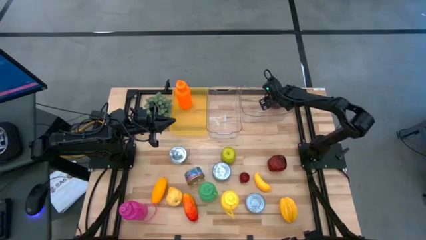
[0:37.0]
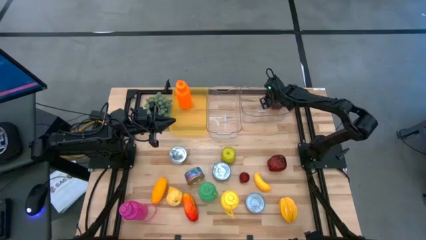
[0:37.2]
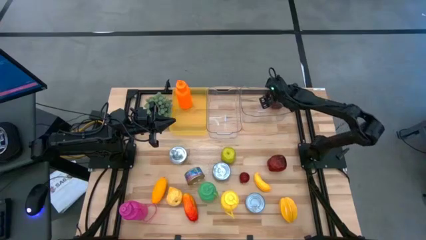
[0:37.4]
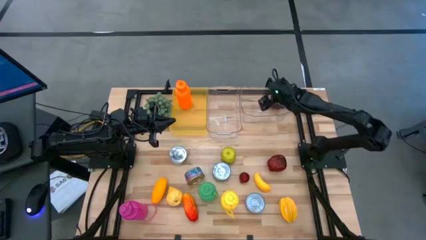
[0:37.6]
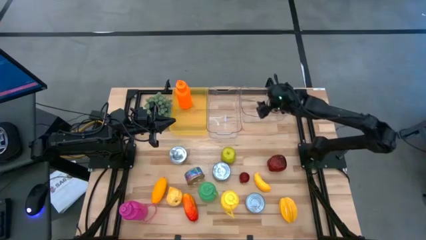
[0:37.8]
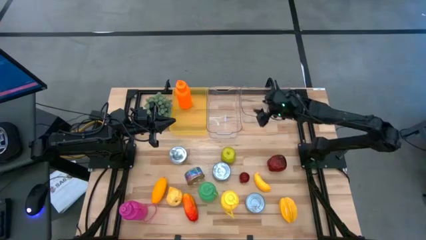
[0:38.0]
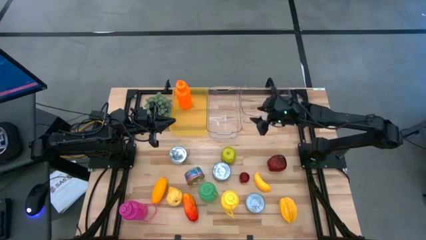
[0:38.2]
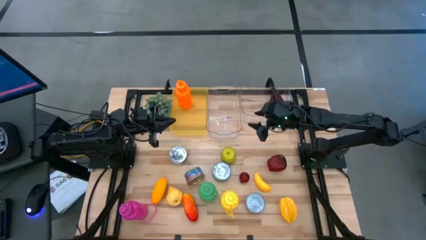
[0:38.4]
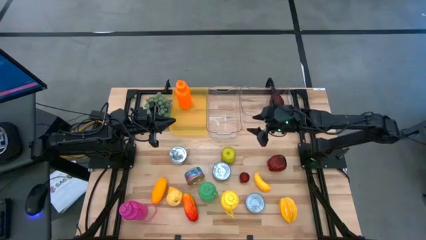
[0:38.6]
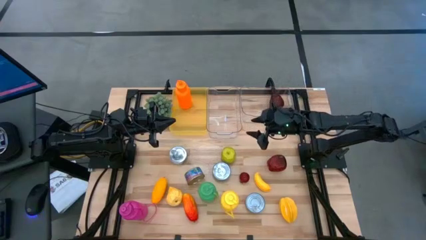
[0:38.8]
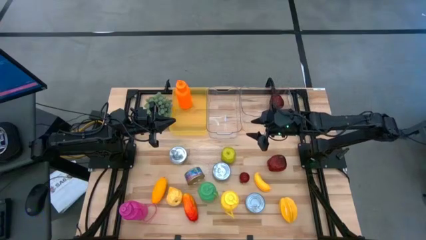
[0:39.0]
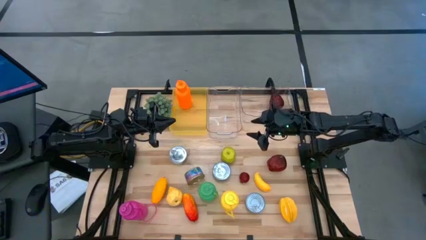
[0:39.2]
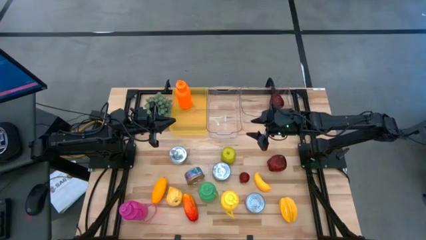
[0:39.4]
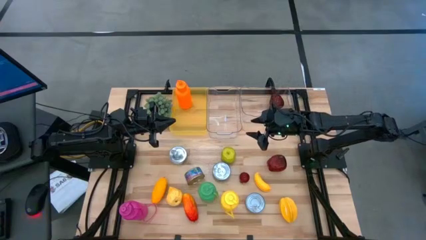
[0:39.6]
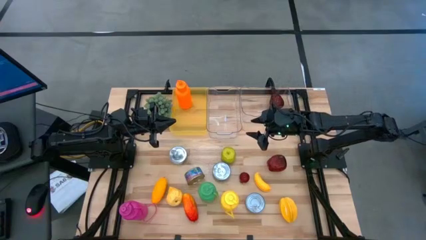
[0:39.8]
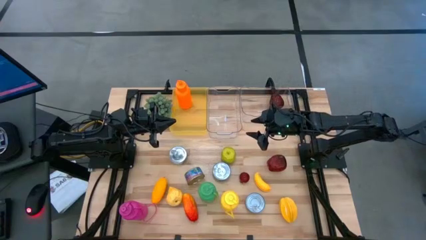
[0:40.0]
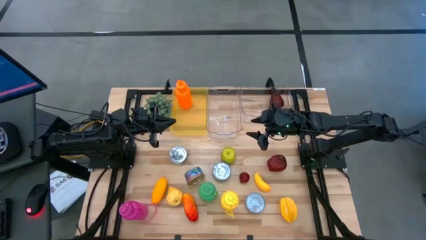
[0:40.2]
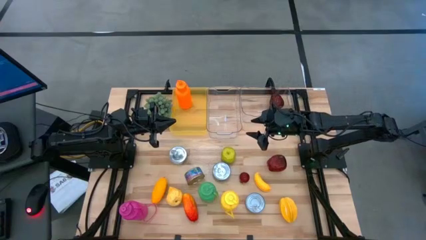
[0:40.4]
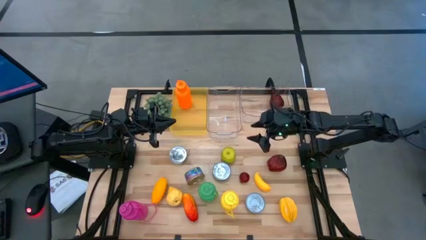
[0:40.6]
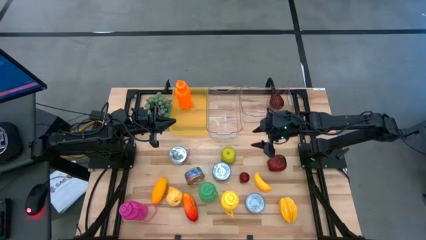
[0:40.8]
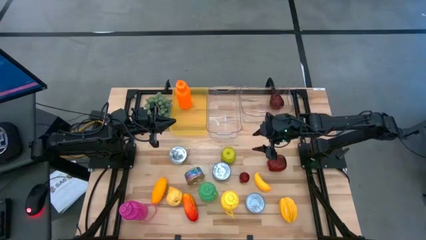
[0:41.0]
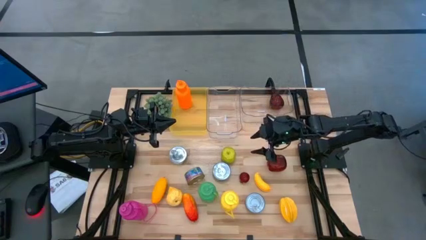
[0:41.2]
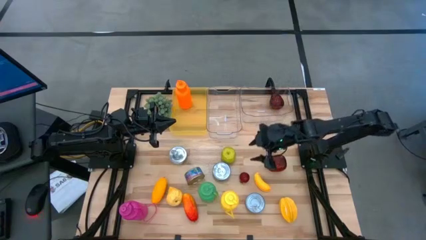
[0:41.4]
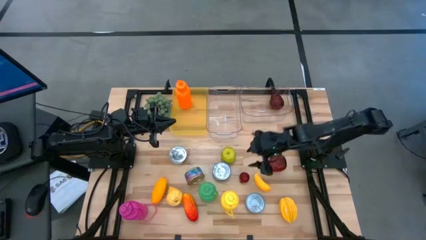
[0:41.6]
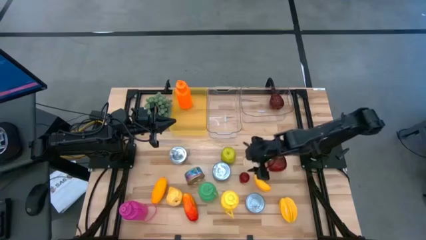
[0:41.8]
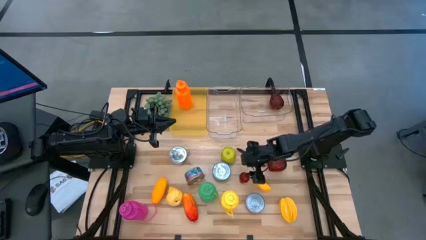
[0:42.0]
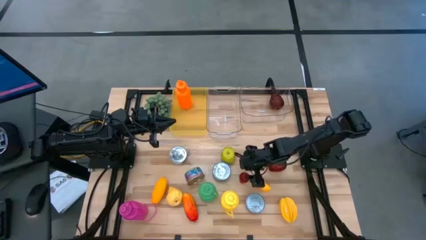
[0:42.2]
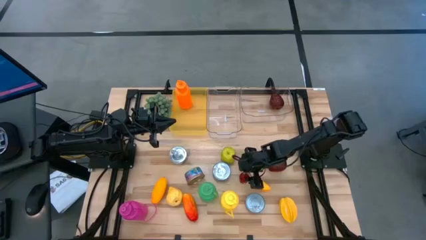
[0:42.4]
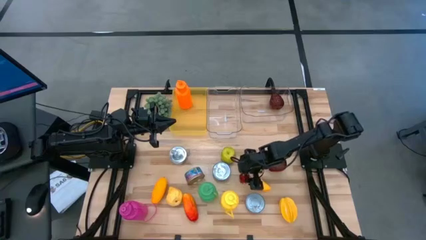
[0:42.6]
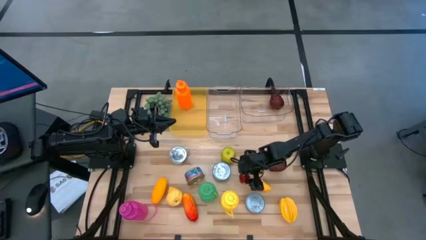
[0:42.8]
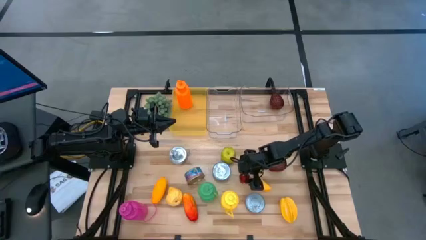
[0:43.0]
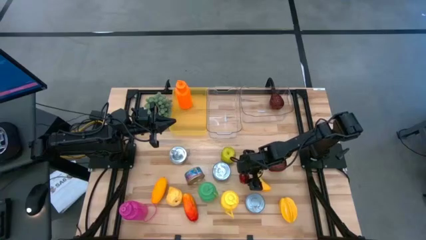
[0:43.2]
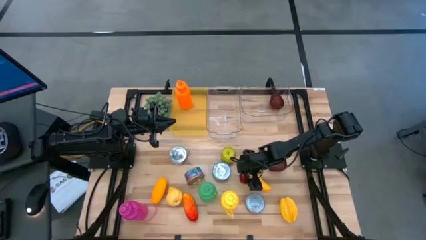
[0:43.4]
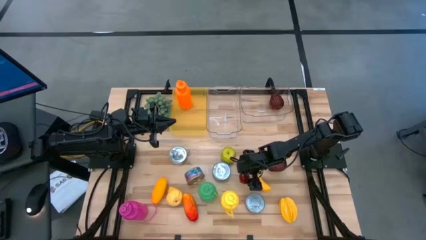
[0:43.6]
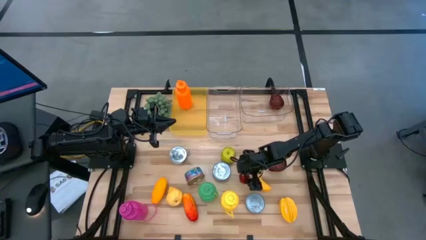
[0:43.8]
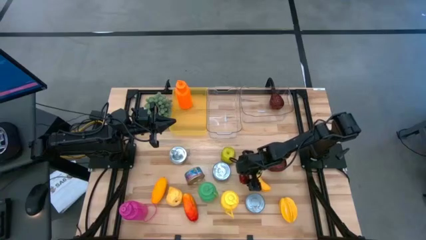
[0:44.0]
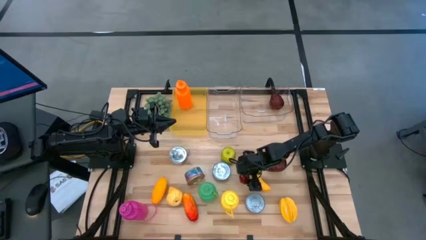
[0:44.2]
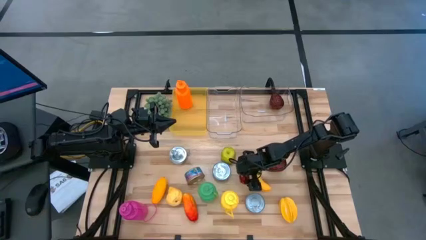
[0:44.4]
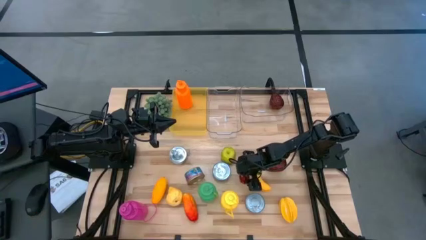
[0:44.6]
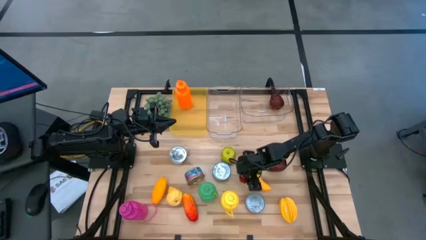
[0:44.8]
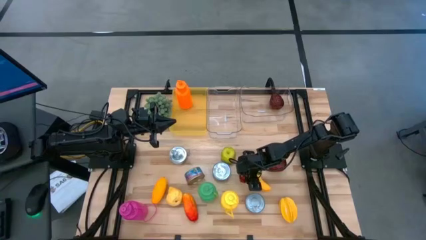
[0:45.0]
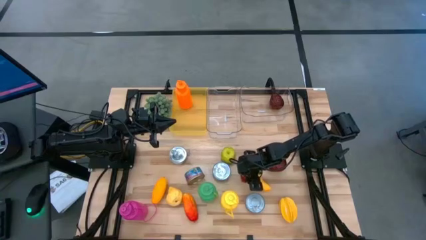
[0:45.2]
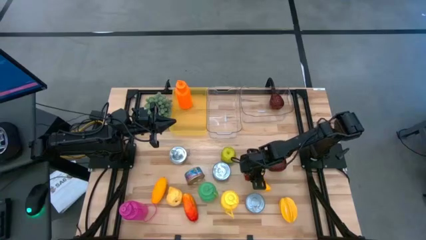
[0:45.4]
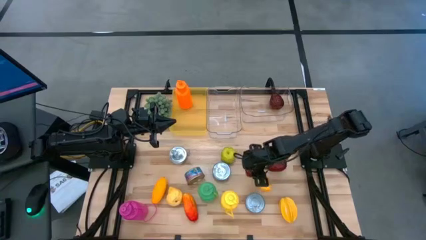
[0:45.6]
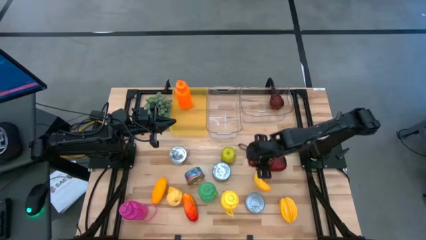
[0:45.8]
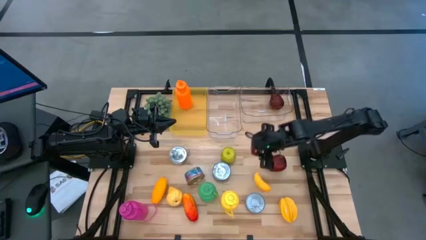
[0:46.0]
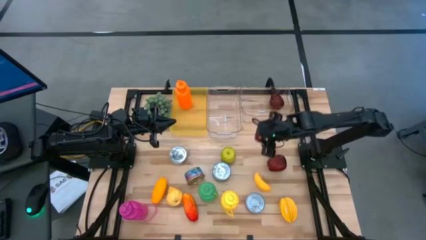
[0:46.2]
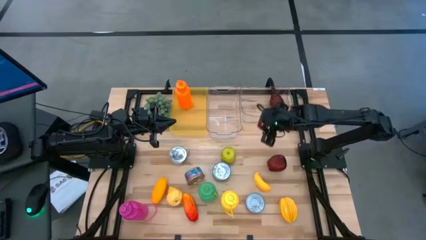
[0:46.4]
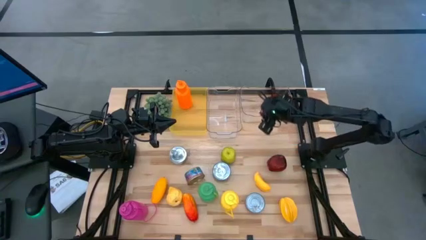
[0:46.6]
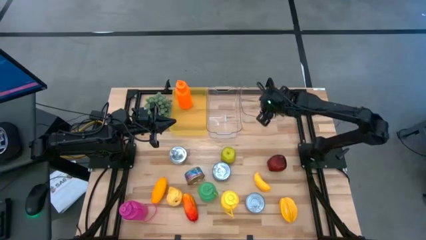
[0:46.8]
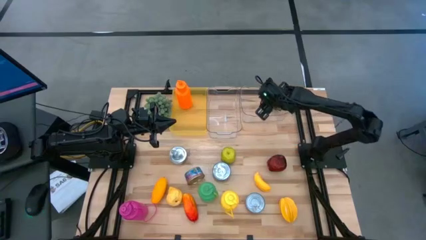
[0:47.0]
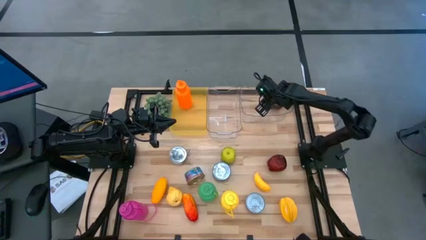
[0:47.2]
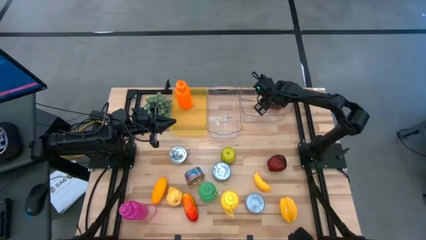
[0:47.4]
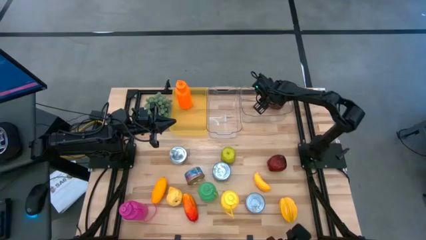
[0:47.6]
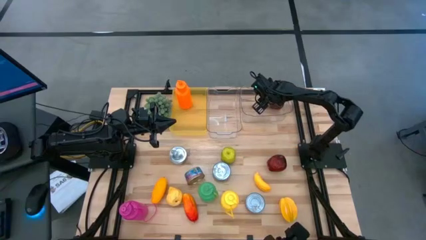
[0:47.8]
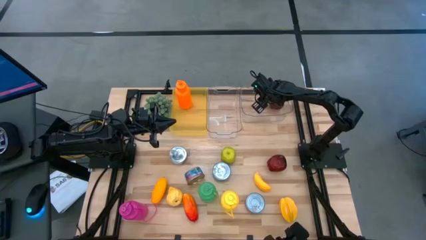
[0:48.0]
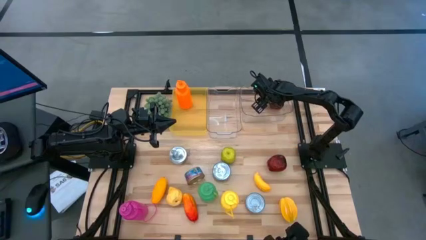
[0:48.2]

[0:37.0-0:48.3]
Task: Pick & Place Food Item
Put the red pomegranate into the right transparent bin
